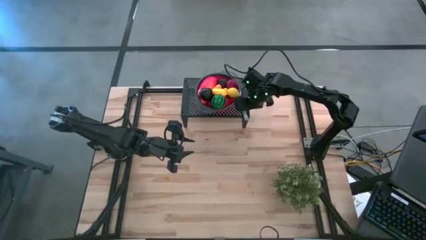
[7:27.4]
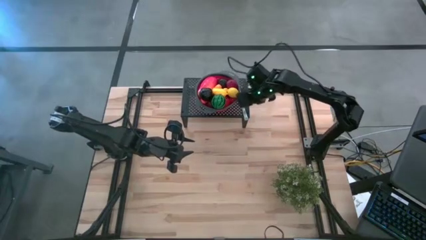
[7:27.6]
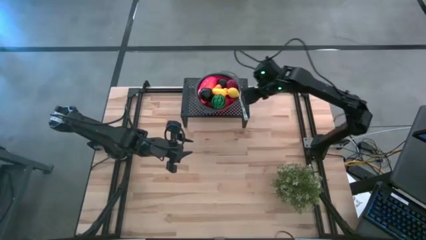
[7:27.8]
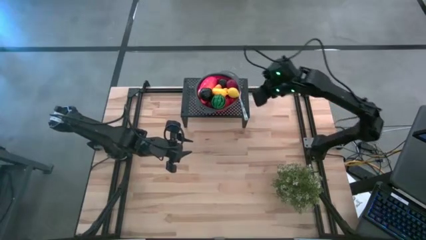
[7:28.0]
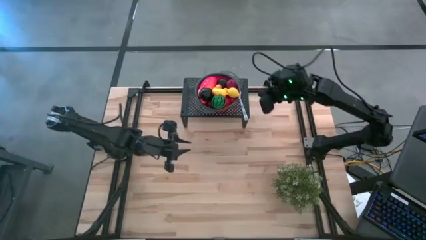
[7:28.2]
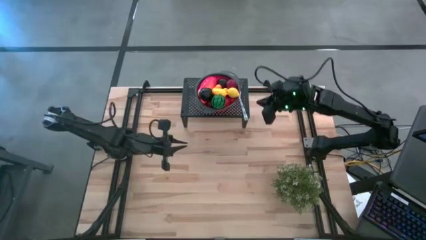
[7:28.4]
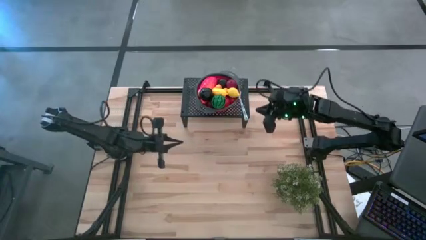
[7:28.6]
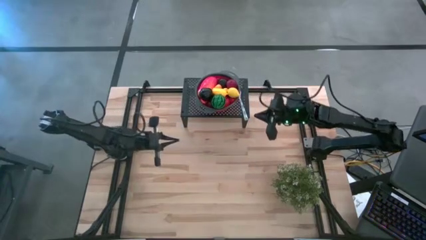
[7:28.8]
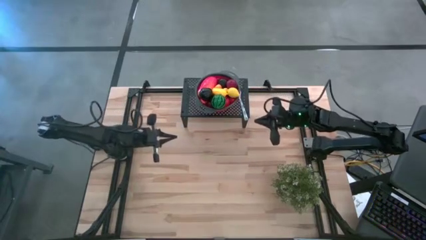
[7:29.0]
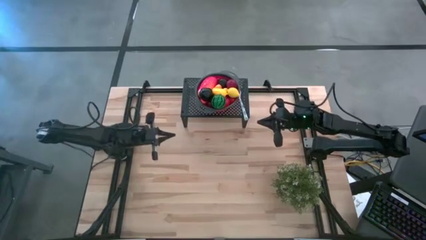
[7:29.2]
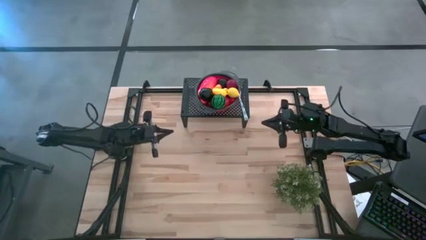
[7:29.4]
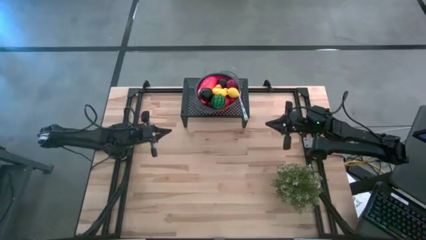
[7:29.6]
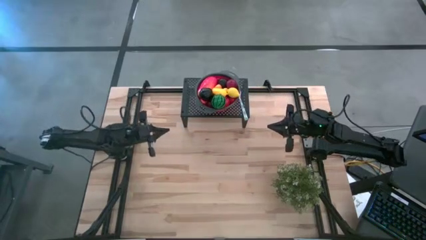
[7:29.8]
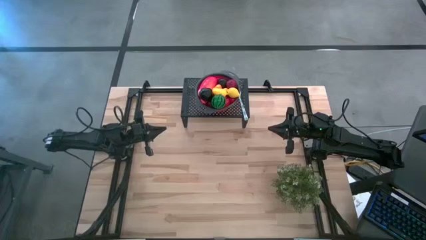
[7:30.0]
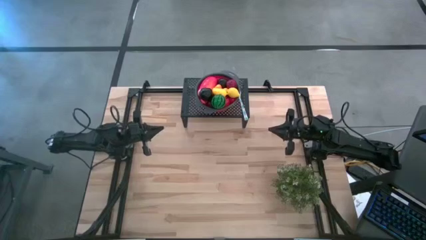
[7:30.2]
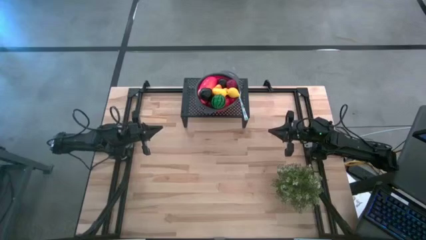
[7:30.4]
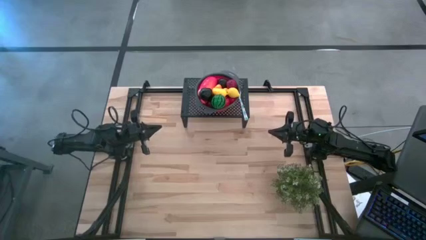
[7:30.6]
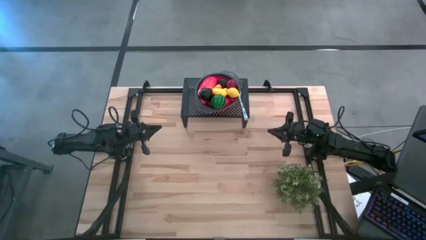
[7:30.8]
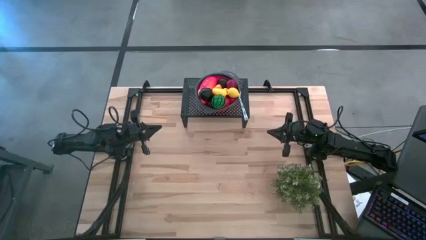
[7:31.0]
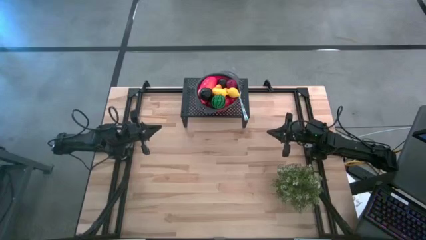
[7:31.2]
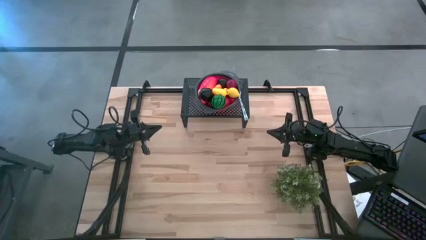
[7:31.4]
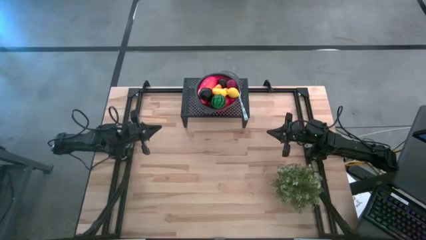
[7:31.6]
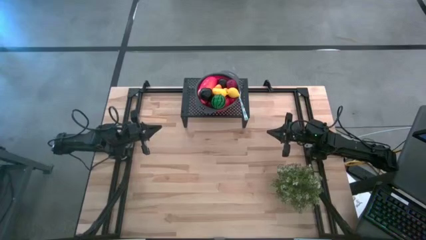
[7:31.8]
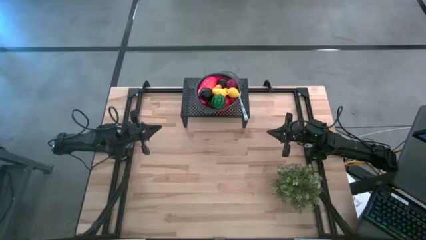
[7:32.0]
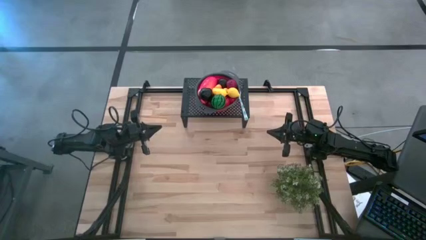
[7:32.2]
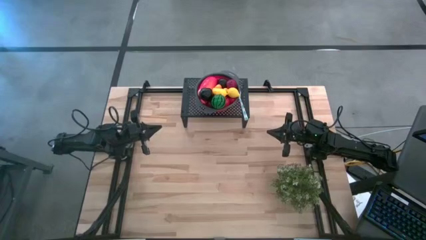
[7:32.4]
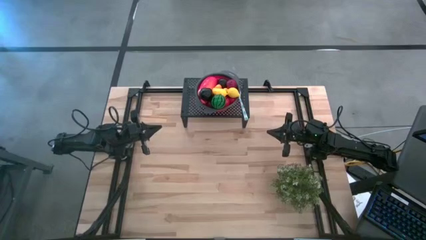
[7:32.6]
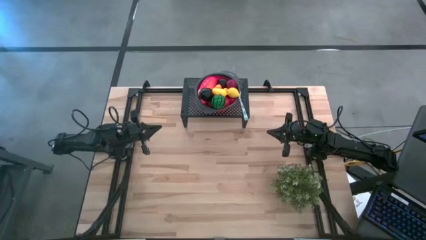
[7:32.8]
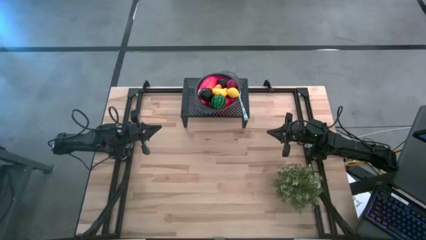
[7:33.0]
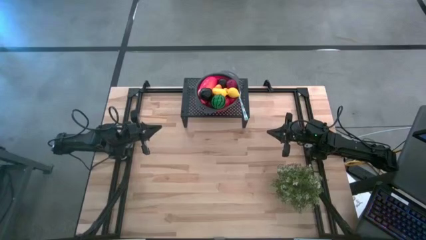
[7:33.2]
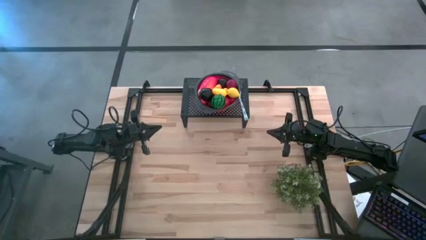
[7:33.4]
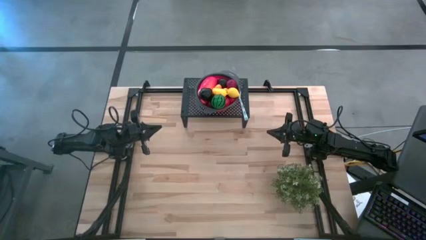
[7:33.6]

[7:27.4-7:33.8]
Task: Pick & Place Fruit
Return to Home Position

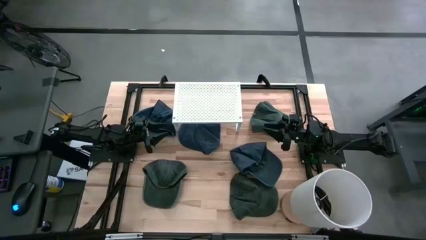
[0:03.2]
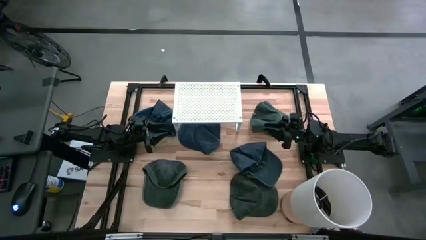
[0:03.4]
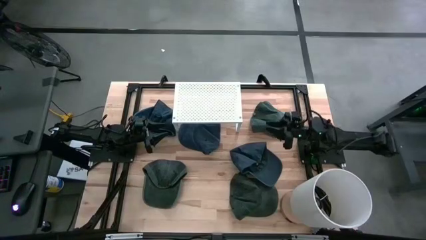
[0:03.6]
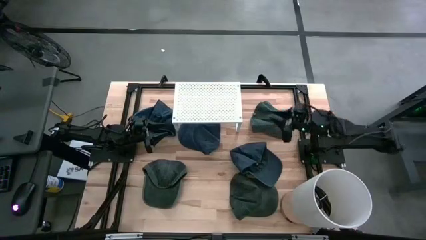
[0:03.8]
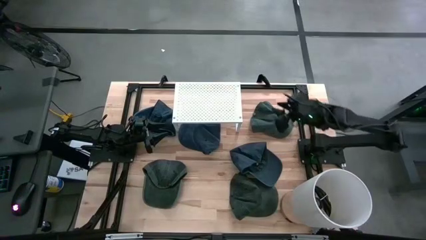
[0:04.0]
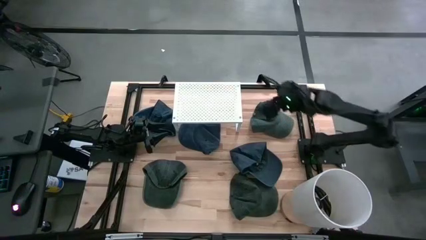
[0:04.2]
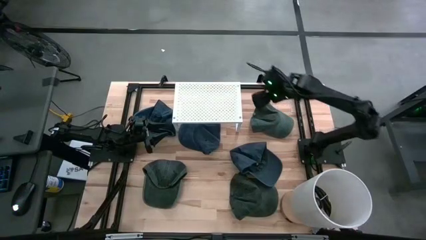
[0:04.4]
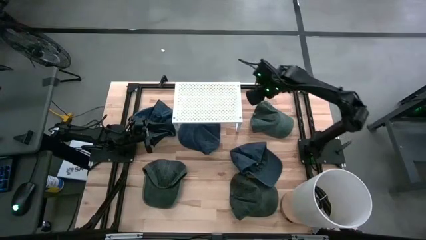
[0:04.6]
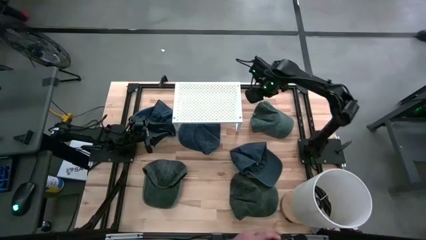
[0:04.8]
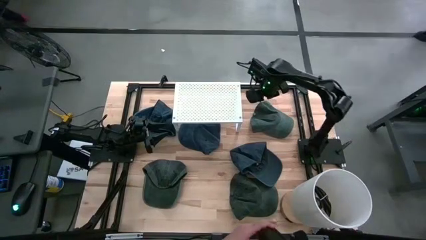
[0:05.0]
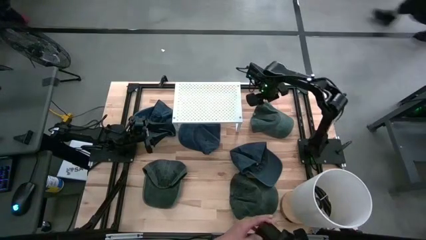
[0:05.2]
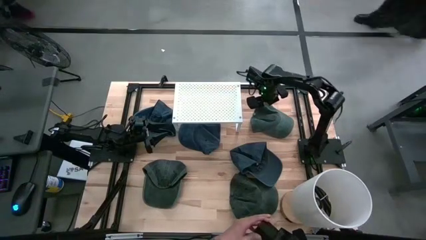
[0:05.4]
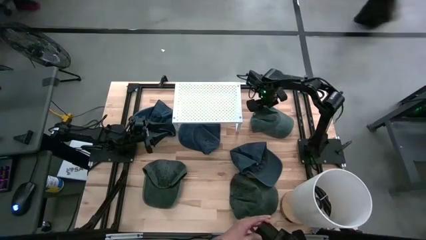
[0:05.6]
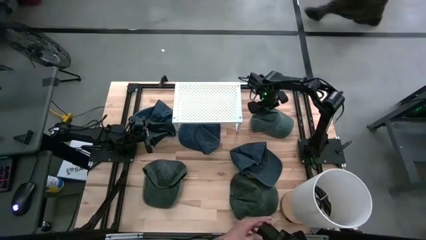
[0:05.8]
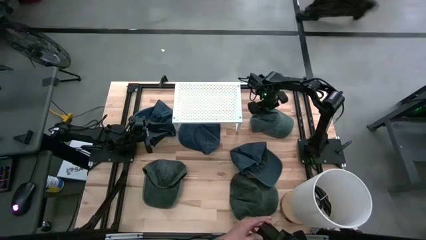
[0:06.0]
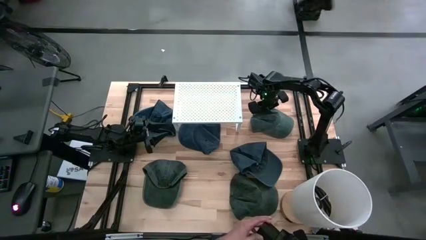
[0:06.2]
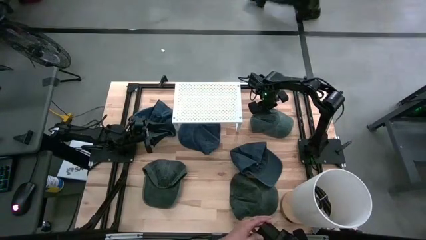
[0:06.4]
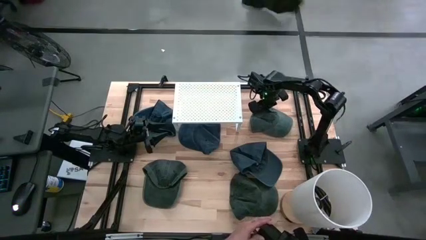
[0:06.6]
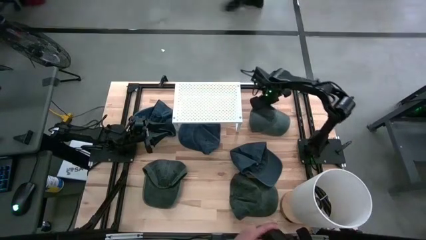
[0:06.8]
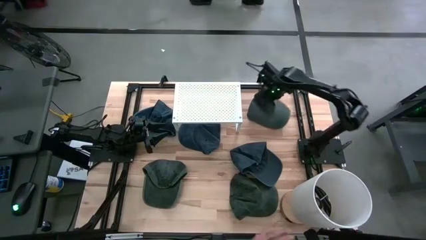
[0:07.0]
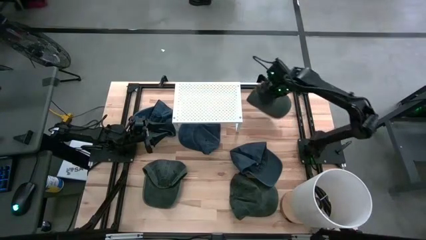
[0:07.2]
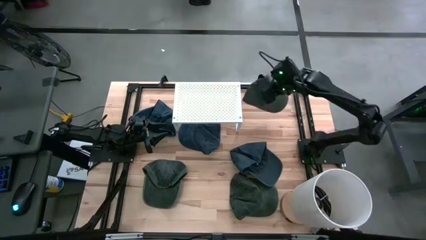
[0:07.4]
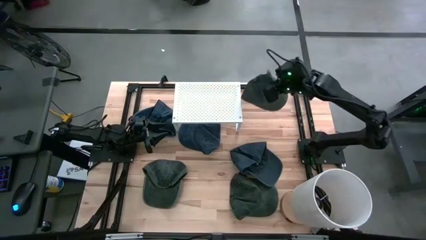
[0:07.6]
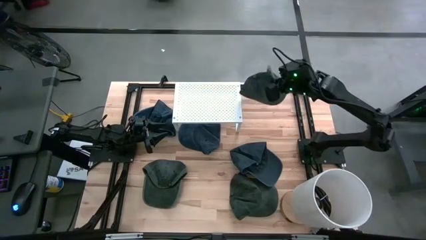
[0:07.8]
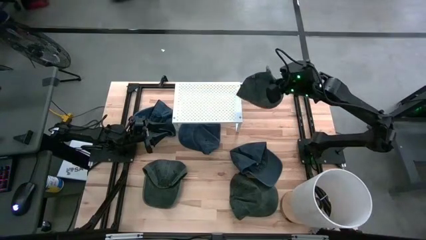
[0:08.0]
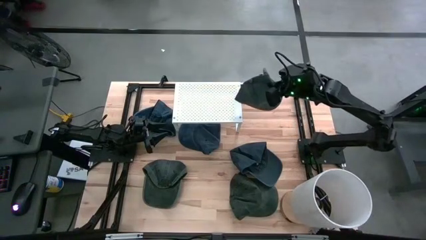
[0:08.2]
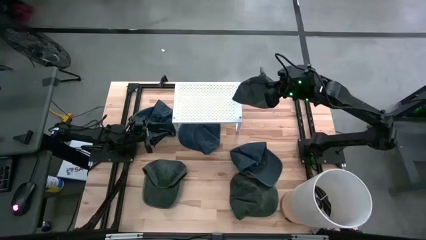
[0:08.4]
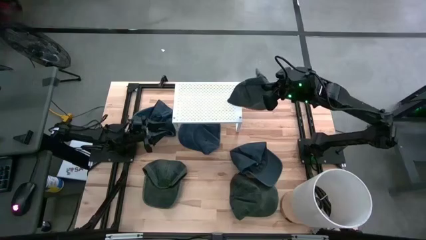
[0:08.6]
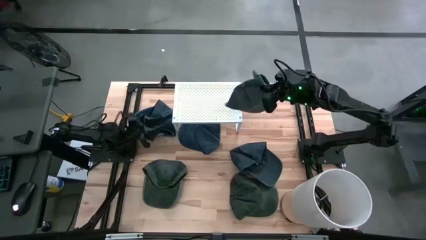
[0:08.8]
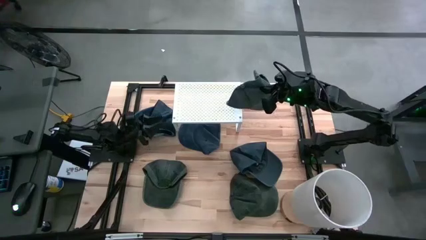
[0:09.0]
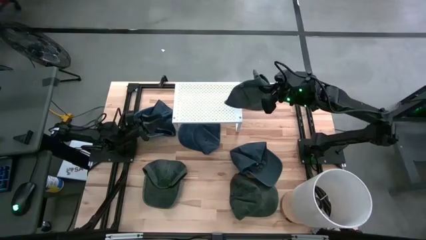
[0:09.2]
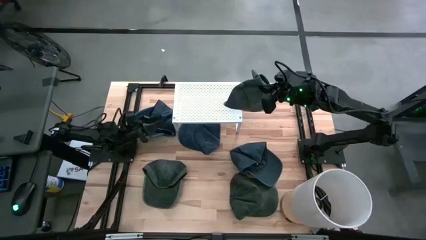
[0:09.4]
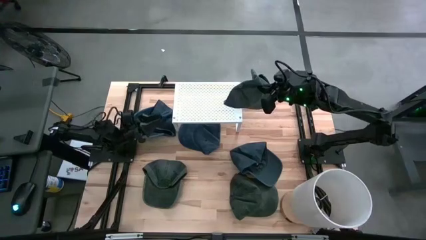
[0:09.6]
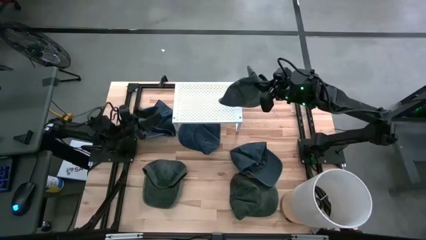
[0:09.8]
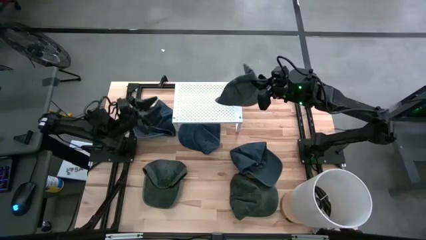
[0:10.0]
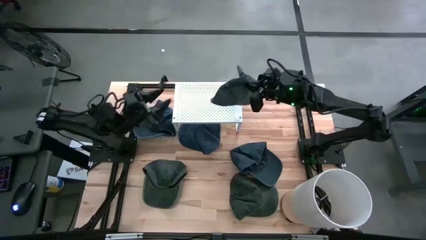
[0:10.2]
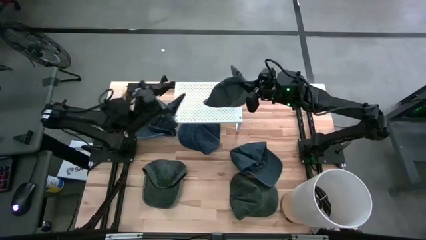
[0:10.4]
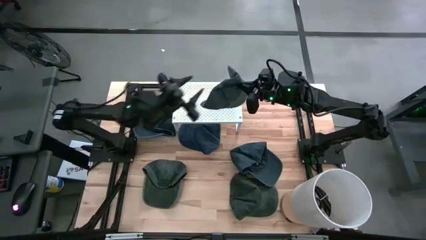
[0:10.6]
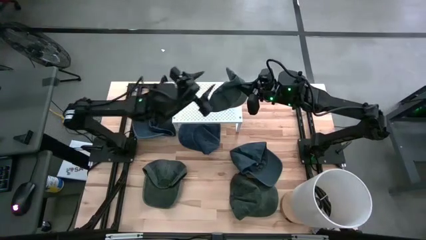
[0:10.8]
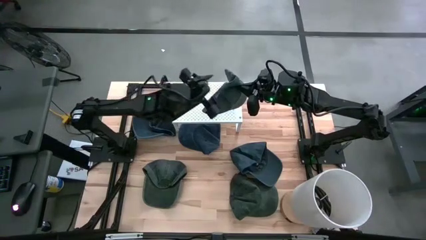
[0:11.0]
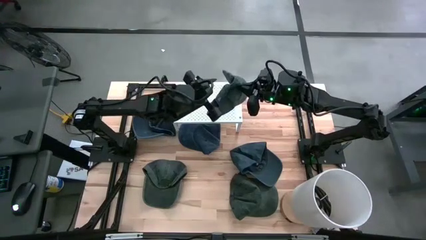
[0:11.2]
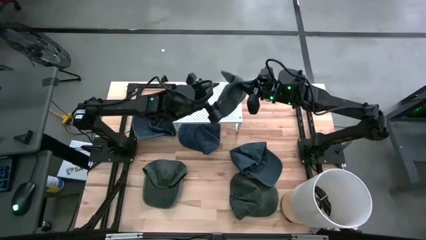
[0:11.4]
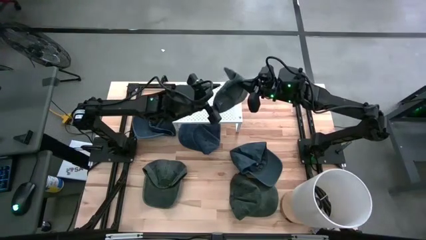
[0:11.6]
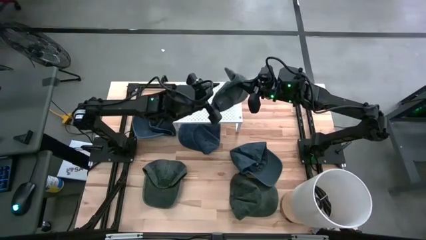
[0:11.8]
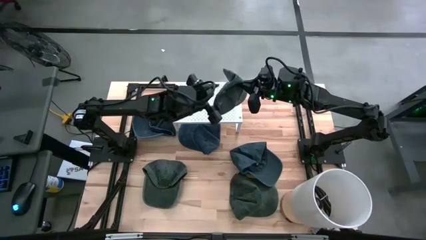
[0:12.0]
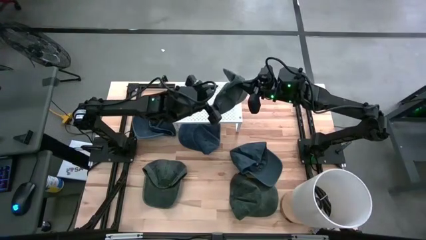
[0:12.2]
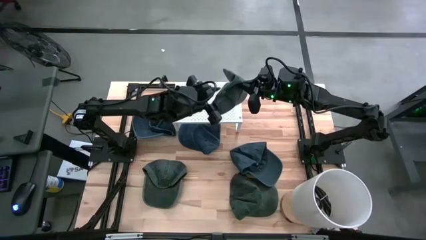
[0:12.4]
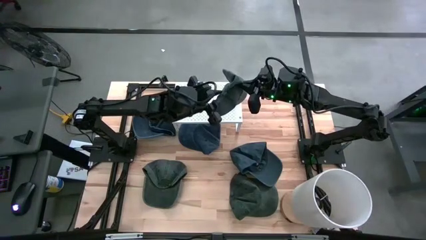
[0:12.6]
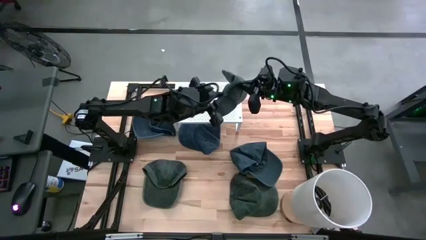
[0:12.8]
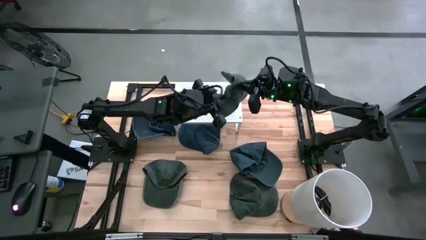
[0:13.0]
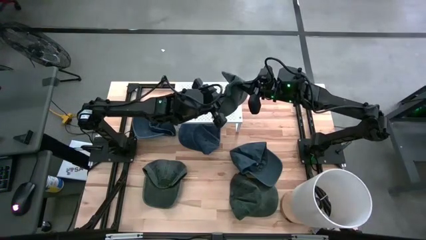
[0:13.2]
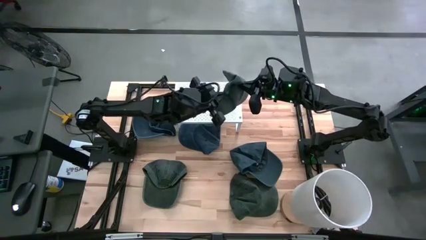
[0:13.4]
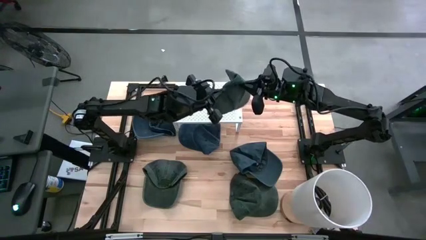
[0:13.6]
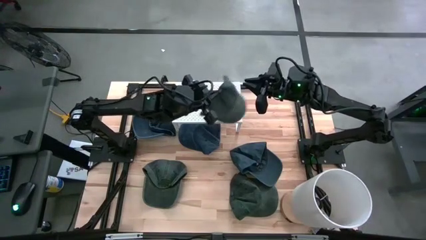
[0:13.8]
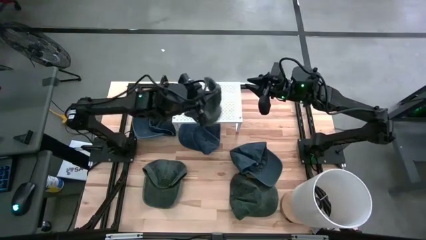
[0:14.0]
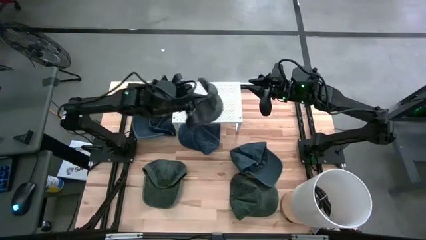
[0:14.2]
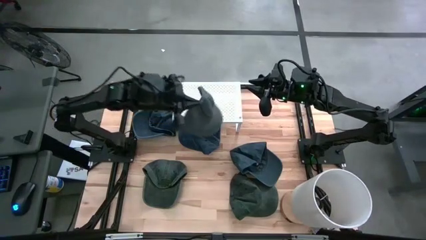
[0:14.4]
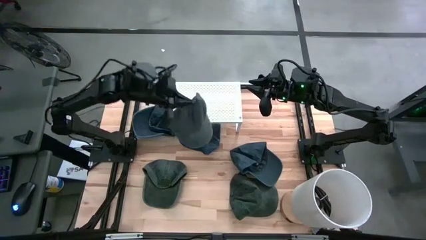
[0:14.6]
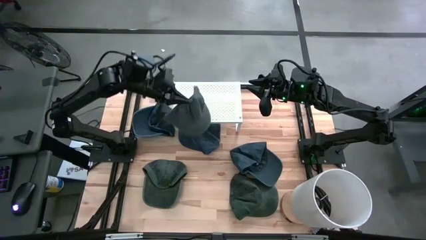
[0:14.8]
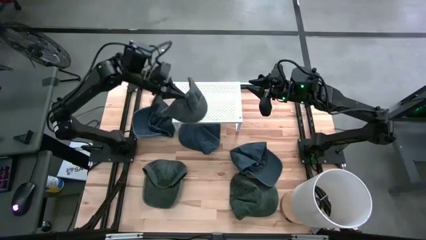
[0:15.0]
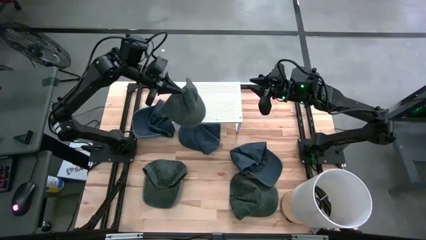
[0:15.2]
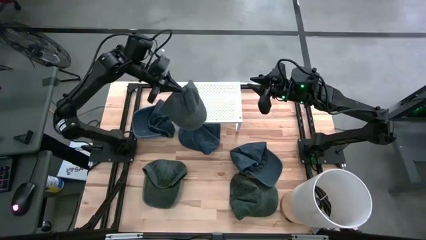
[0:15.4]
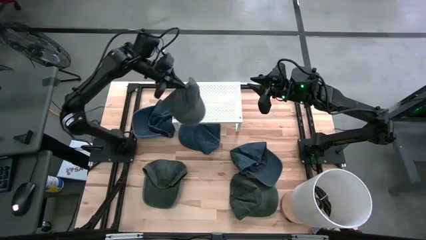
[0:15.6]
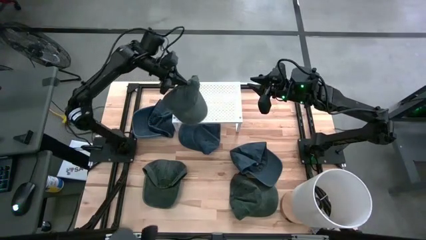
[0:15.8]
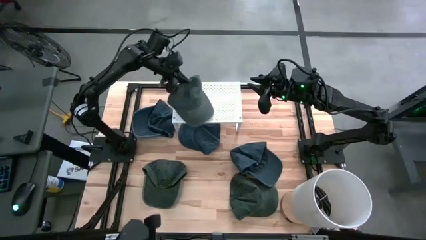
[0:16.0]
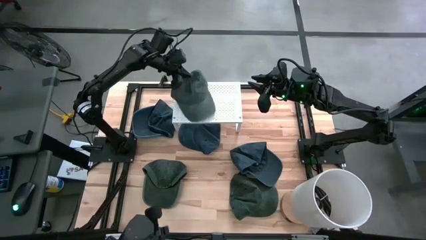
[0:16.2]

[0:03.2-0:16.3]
Task: Pick & Place hat
Put the top right gray cap on the shelf
